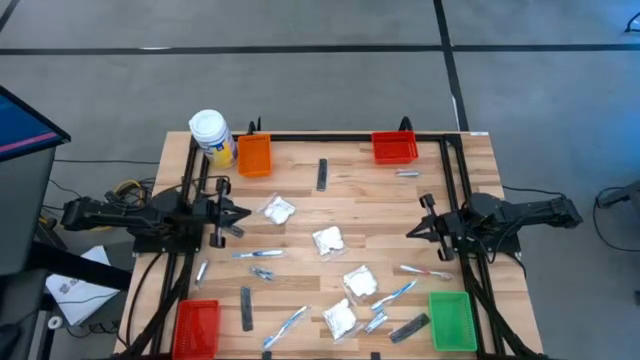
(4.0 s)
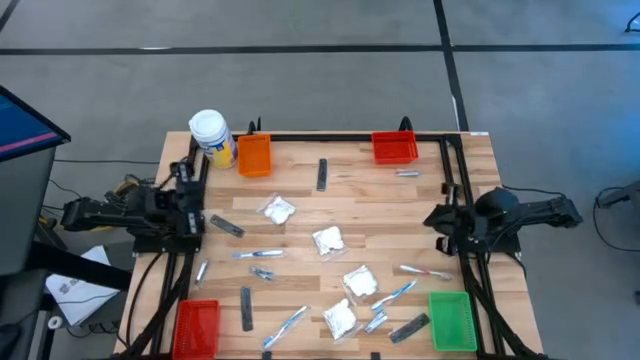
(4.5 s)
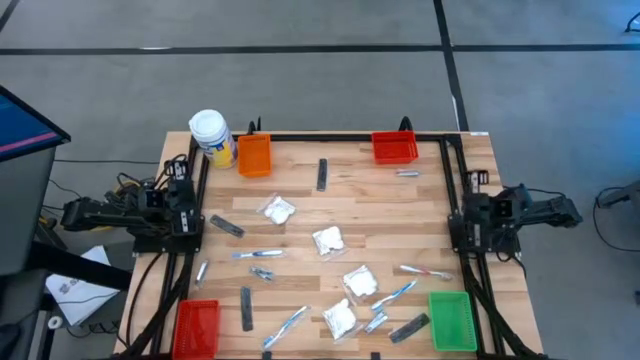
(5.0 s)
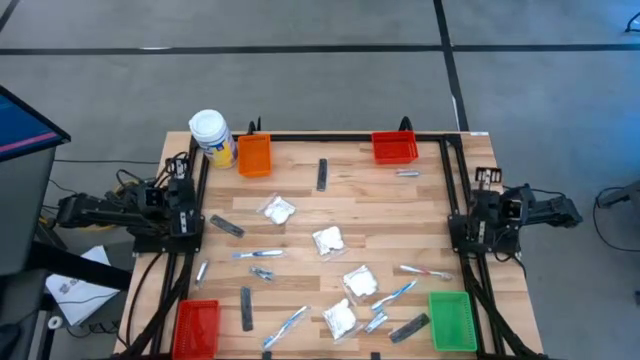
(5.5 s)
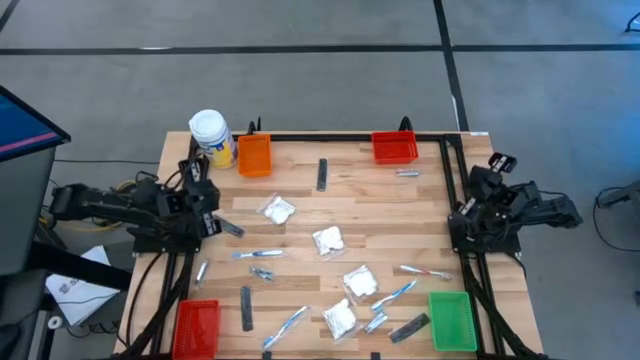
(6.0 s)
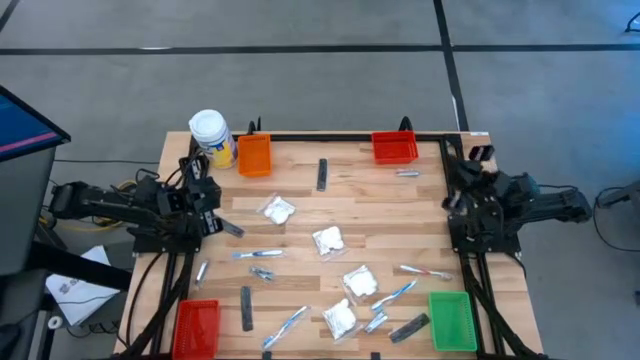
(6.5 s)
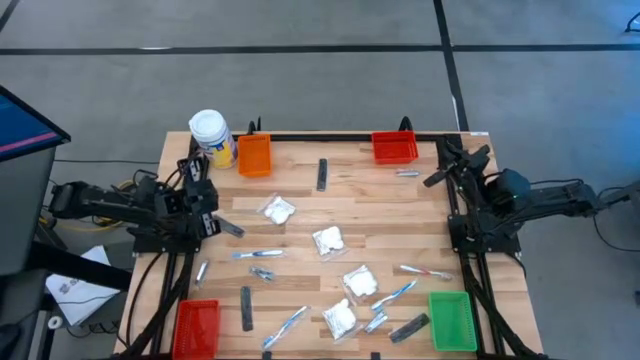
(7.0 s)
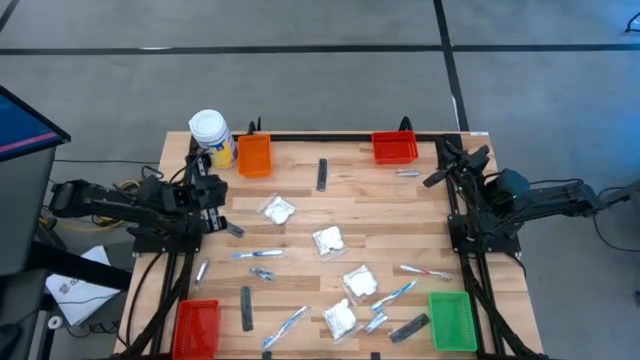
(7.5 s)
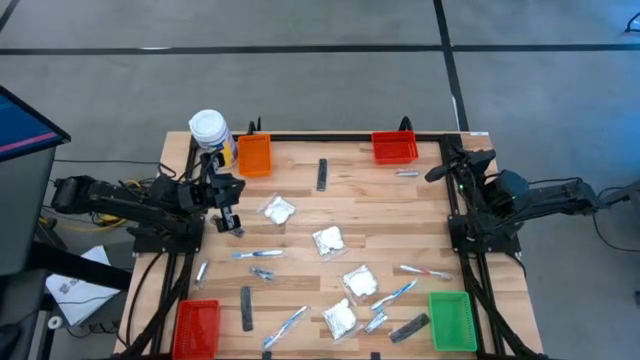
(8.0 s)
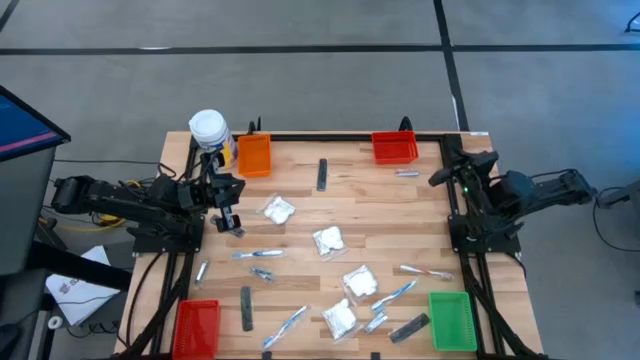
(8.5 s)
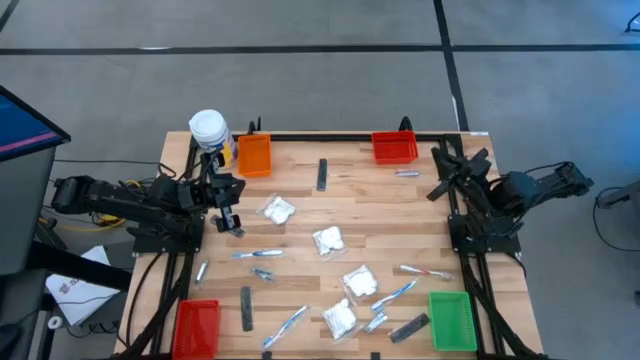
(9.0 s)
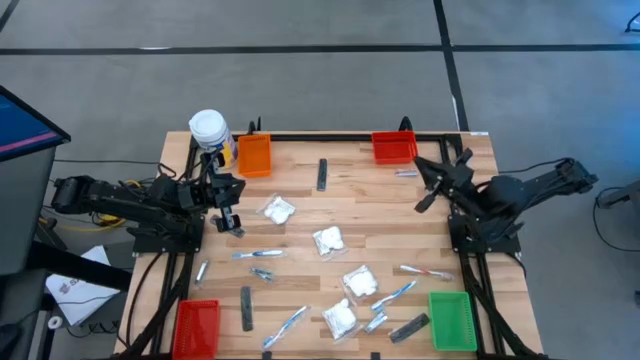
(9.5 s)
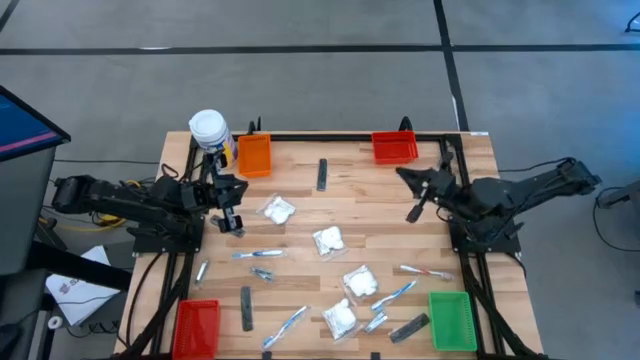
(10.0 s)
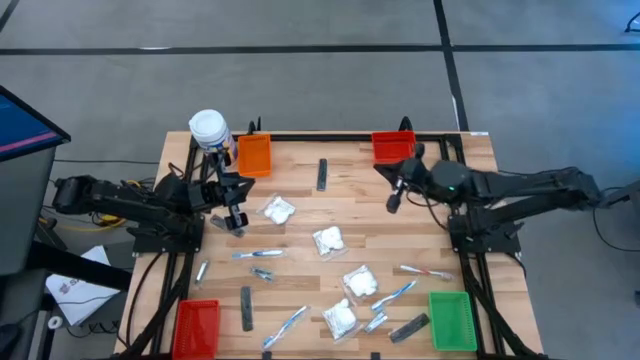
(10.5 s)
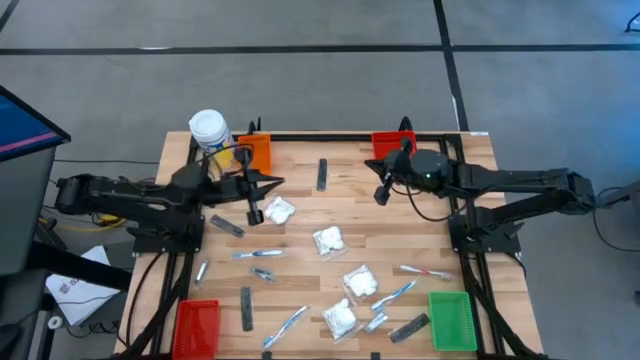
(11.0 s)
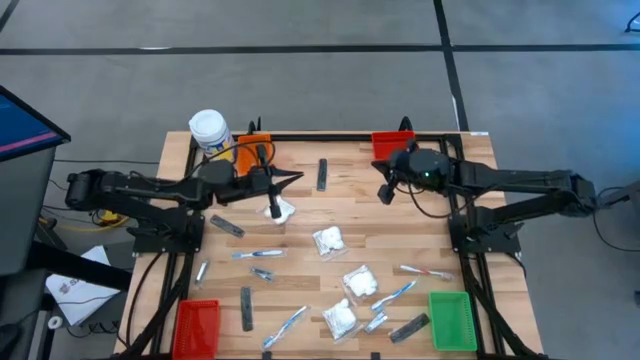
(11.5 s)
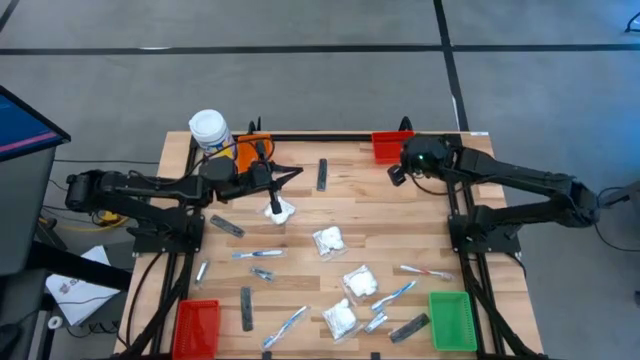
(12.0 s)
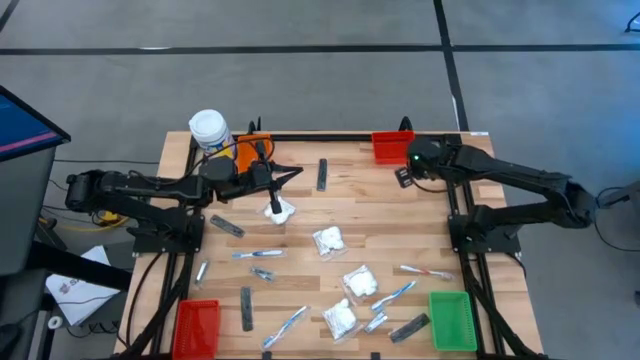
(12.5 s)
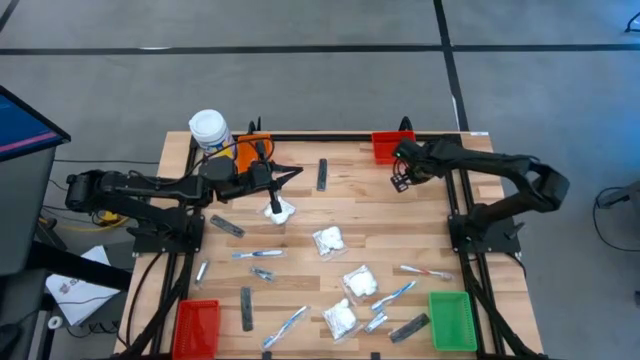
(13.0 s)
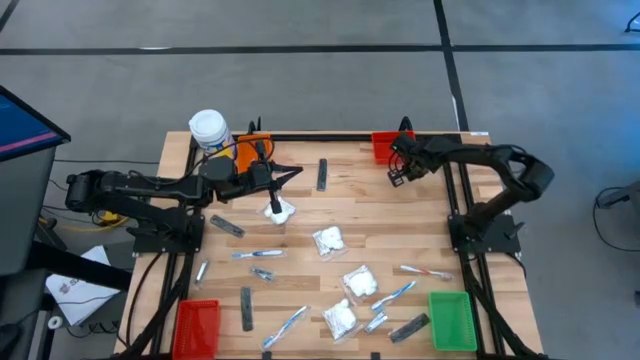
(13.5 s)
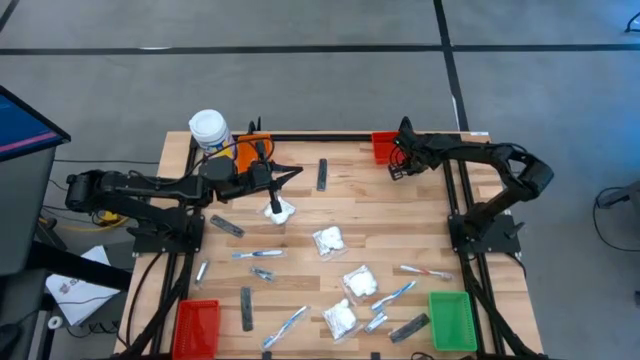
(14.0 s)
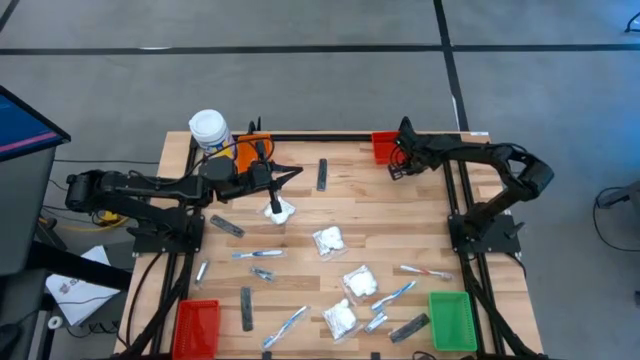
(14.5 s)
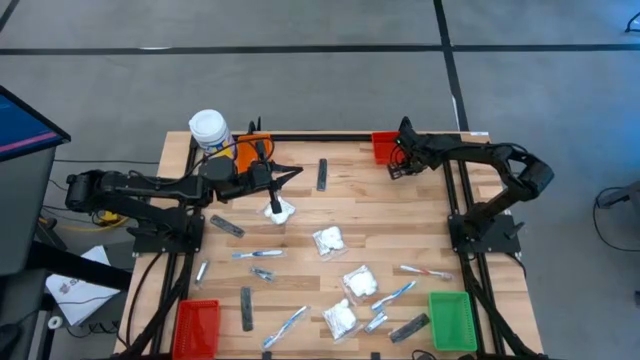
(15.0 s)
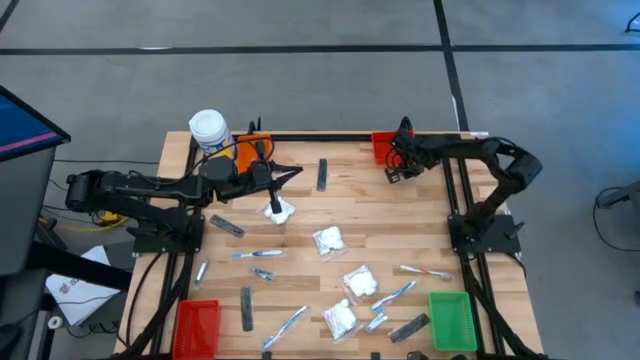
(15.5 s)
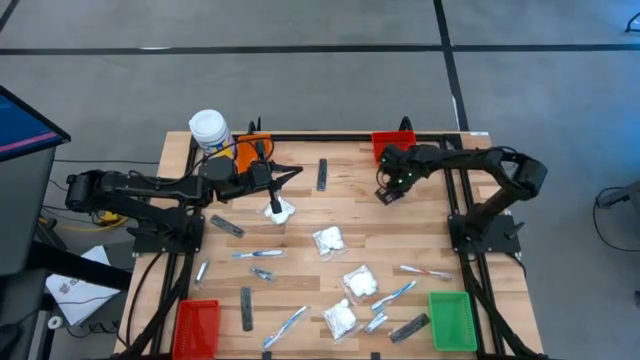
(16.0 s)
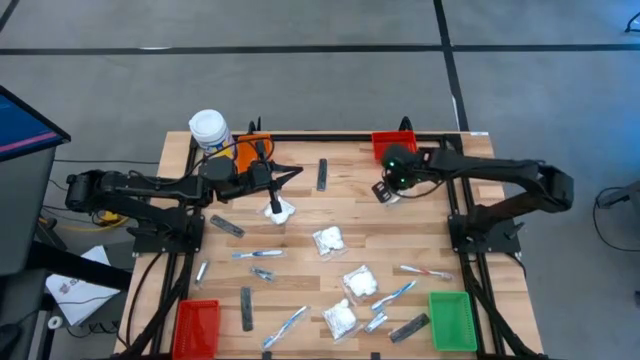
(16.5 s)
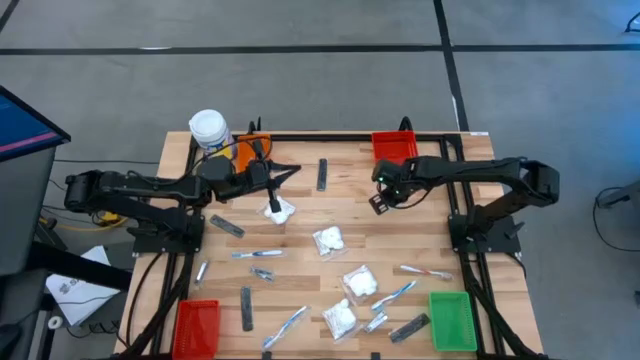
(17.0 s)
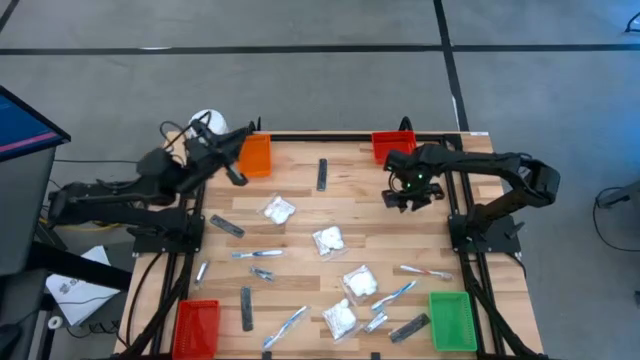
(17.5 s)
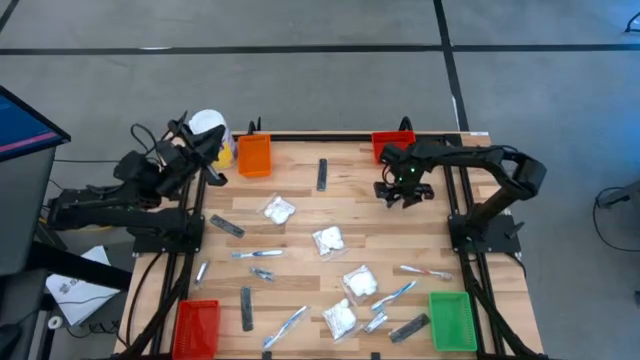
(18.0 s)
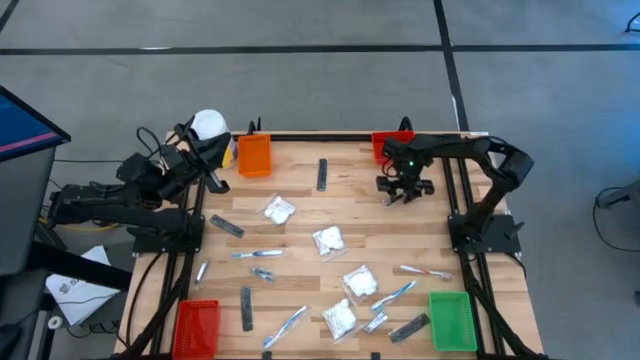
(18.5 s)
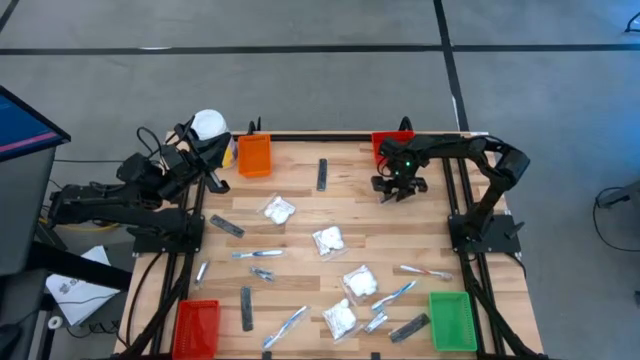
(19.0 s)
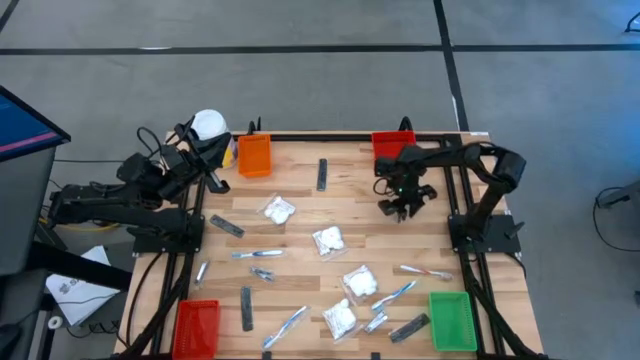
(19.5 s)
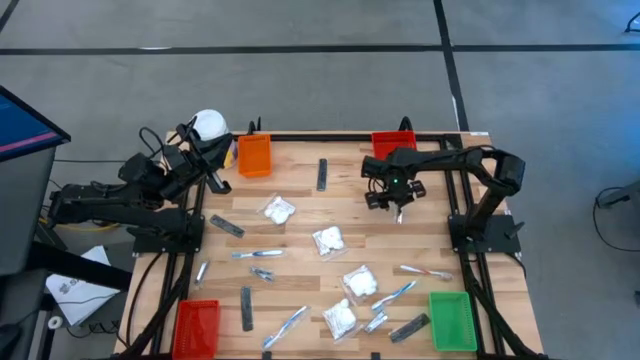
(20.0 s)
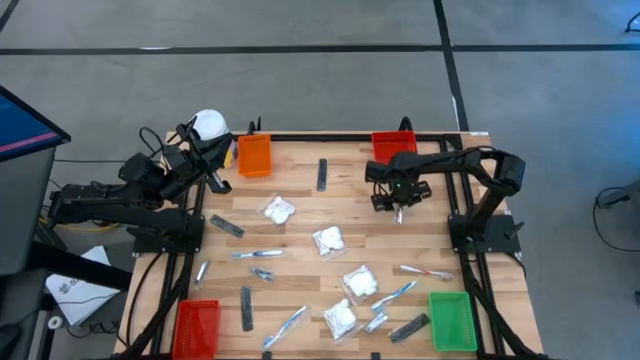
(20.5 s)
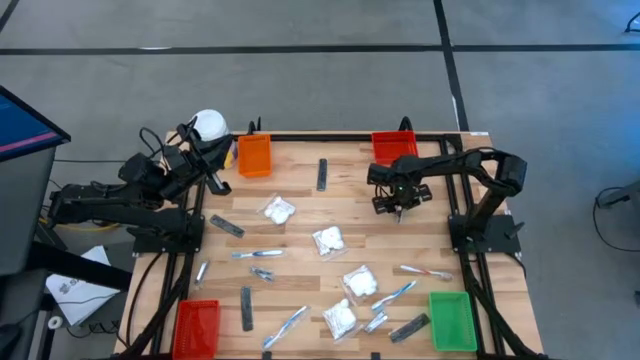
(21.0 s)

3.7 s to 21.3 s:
Task: Pick & Place Travel size toiletries
Put the nail cutter into the green bin

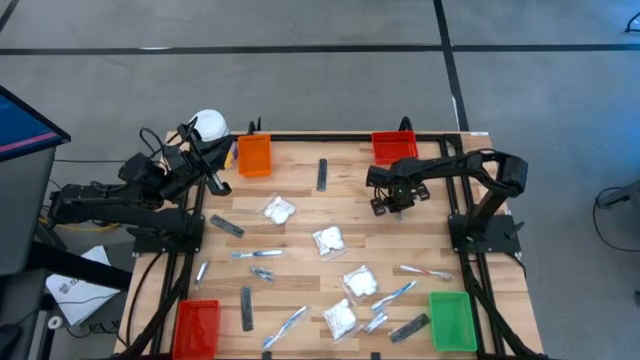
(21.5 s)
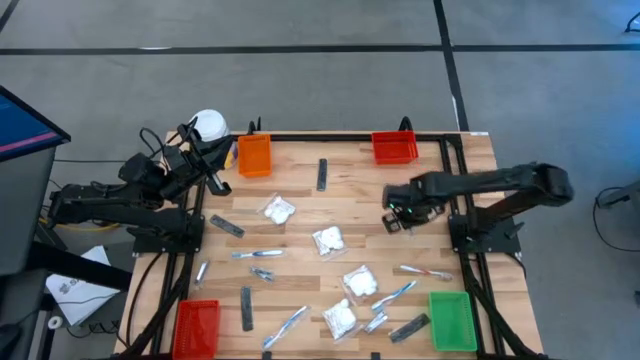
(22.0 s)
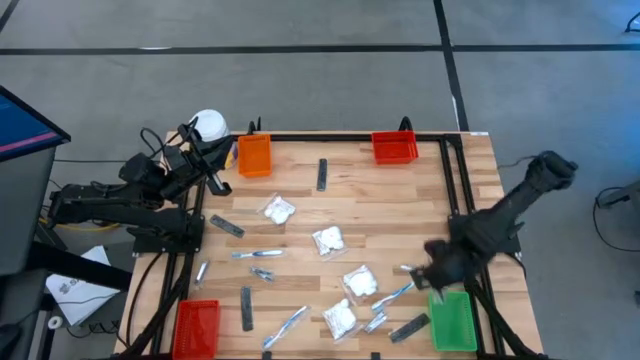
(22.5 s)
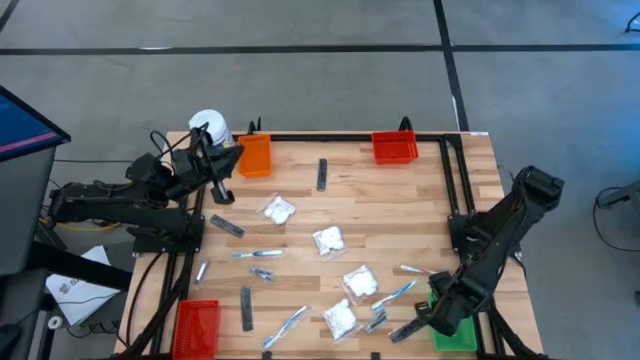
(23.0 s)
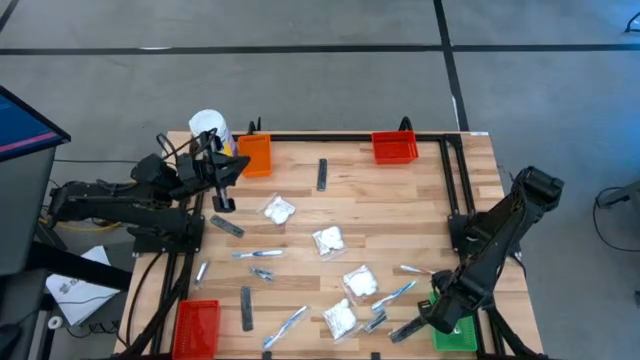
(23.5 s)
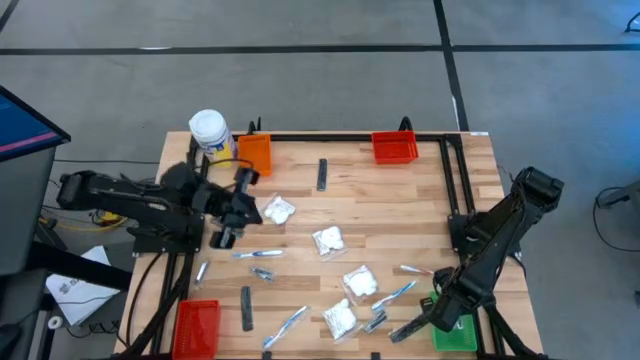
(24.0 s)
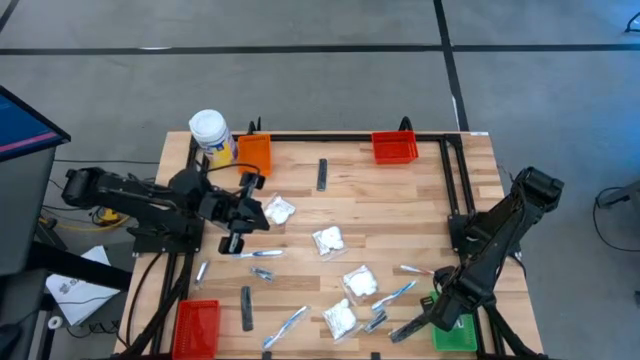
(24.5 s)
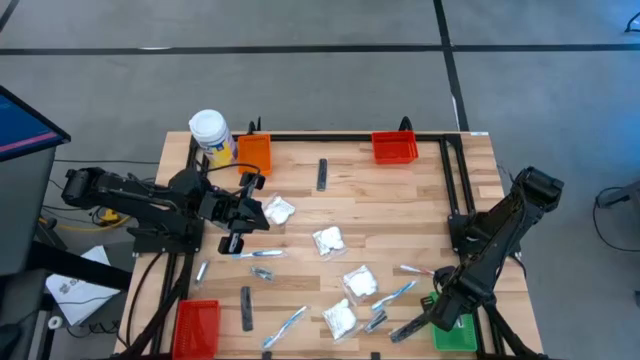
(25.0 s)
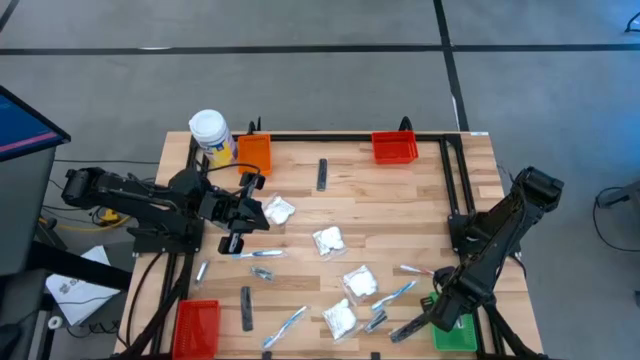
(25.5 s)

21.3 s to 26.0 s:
Put the nail cutter into the green bin
